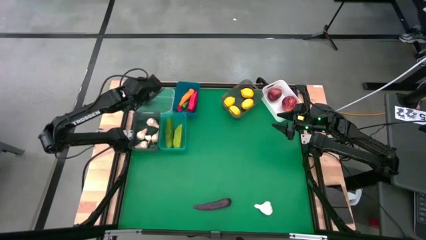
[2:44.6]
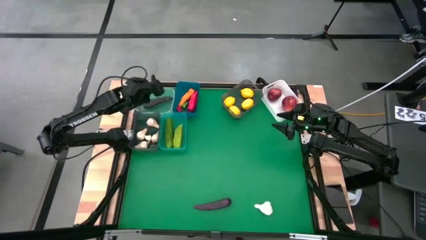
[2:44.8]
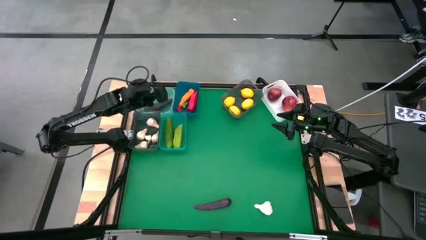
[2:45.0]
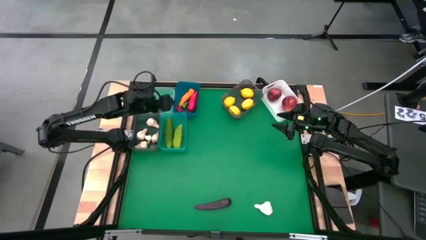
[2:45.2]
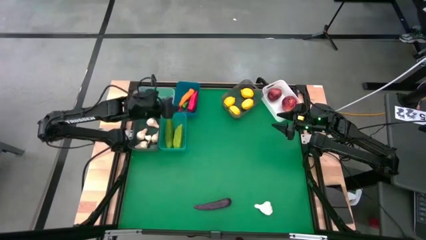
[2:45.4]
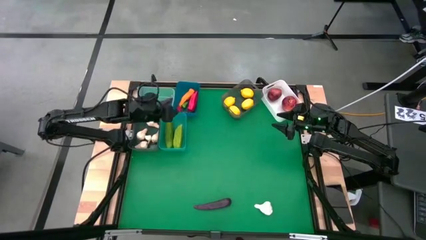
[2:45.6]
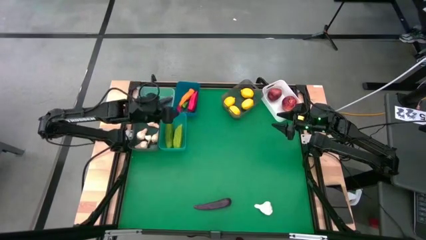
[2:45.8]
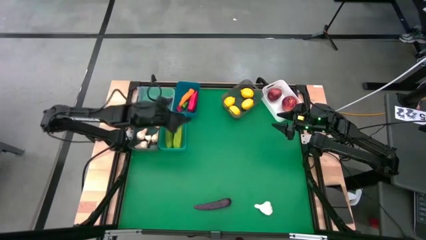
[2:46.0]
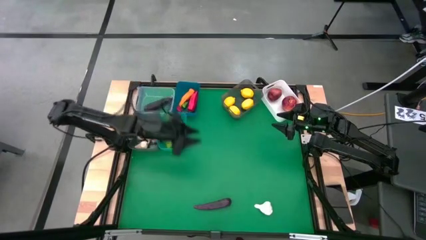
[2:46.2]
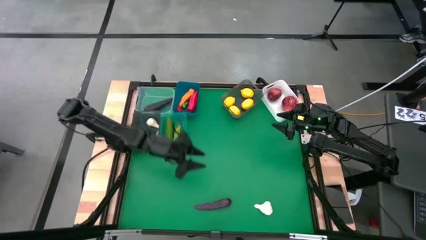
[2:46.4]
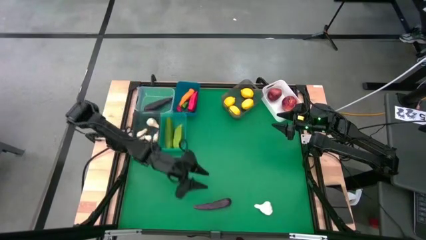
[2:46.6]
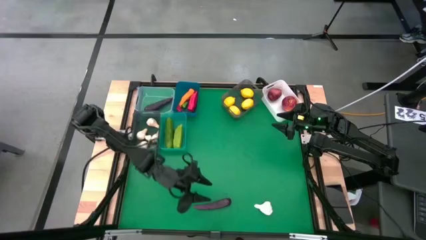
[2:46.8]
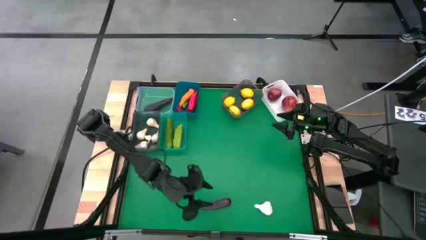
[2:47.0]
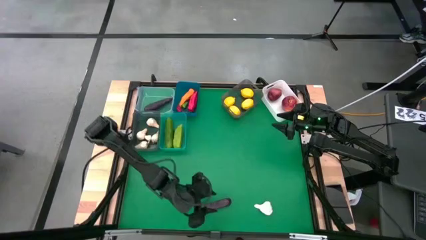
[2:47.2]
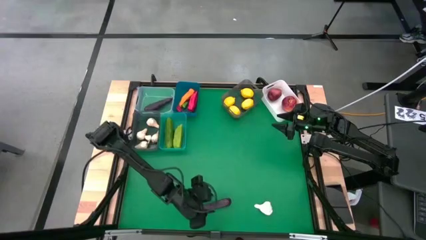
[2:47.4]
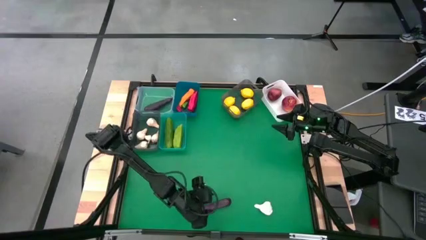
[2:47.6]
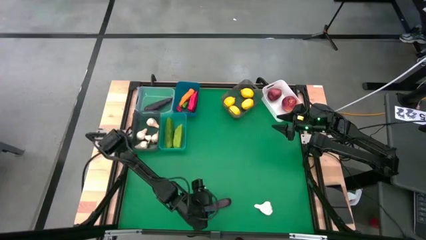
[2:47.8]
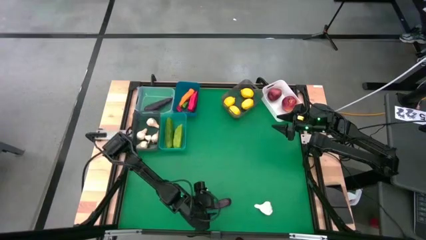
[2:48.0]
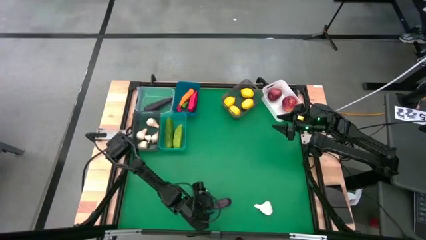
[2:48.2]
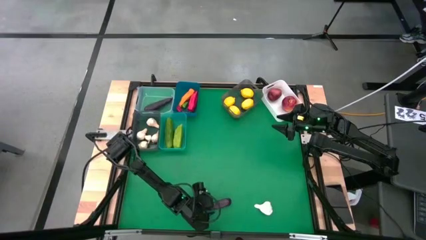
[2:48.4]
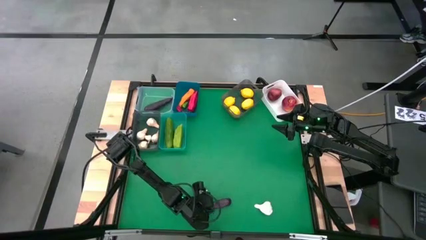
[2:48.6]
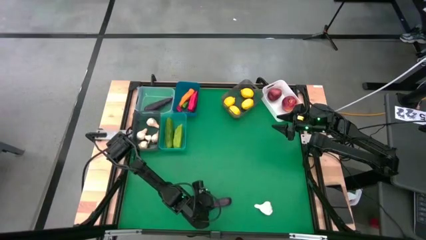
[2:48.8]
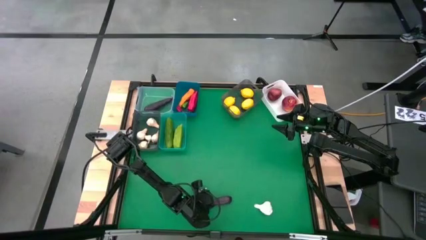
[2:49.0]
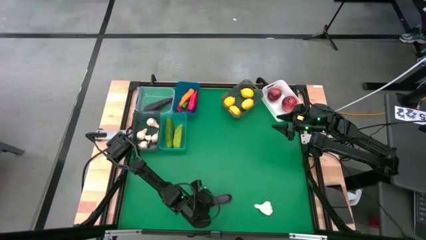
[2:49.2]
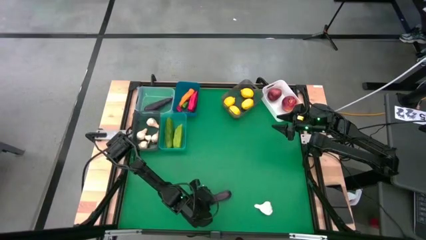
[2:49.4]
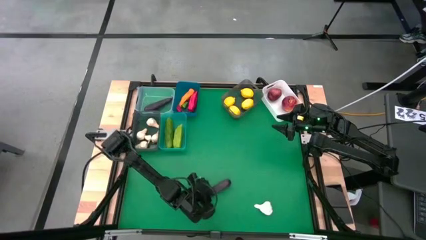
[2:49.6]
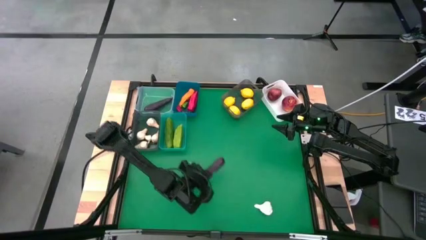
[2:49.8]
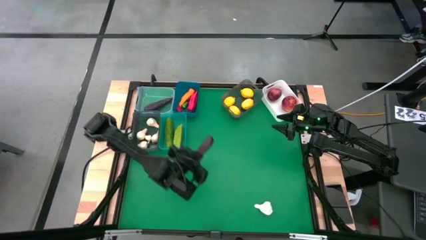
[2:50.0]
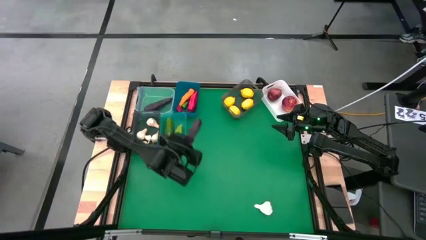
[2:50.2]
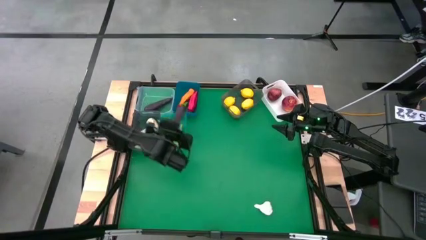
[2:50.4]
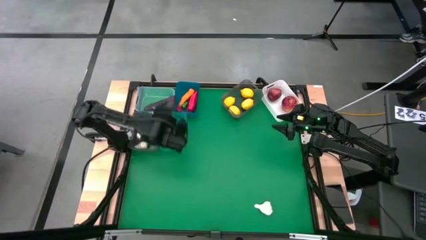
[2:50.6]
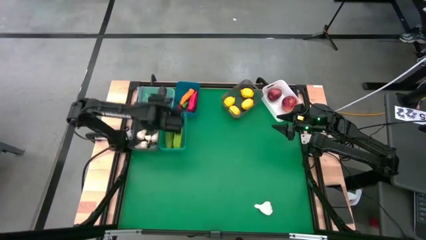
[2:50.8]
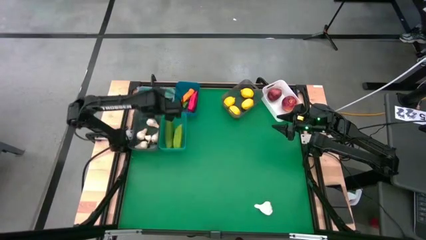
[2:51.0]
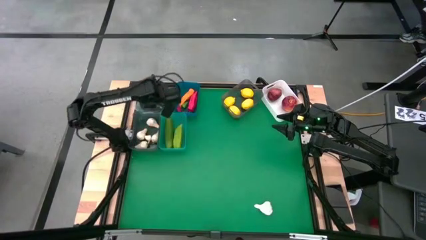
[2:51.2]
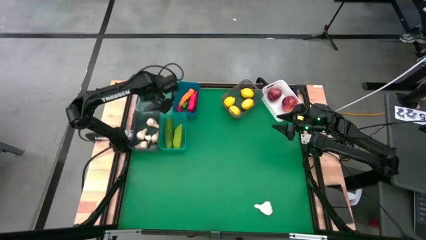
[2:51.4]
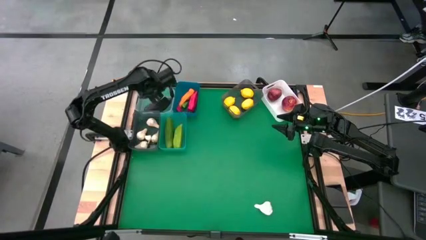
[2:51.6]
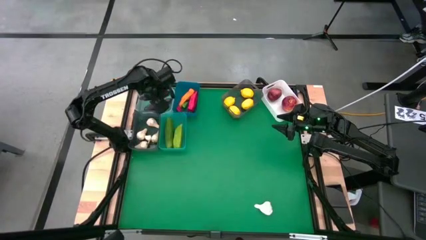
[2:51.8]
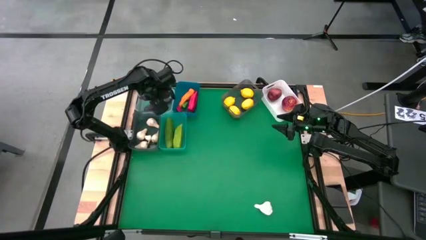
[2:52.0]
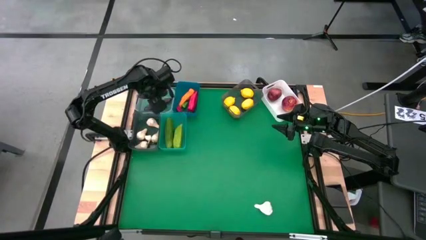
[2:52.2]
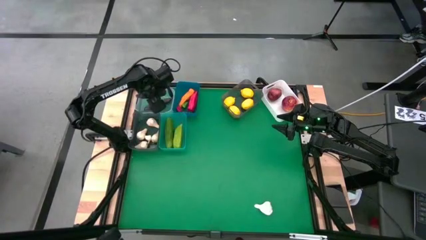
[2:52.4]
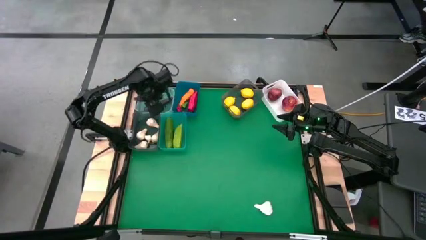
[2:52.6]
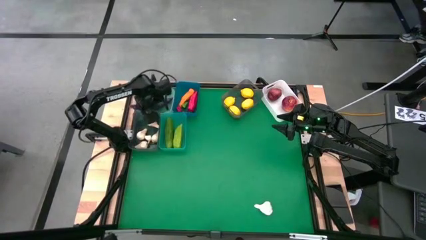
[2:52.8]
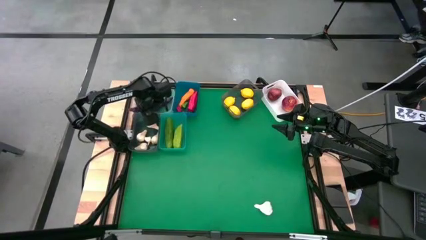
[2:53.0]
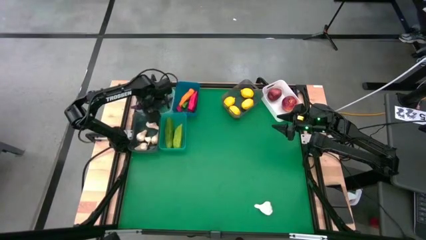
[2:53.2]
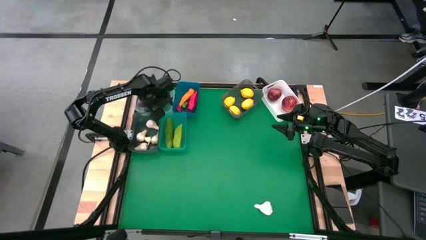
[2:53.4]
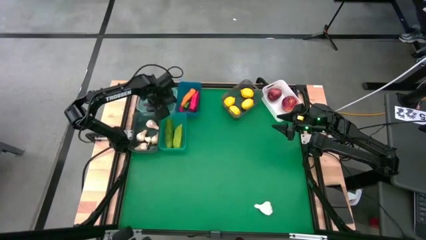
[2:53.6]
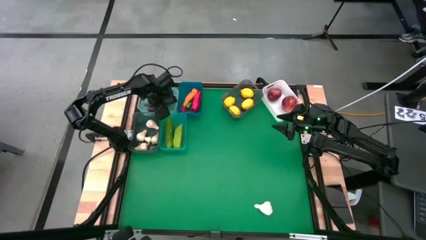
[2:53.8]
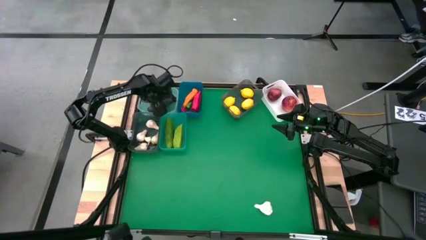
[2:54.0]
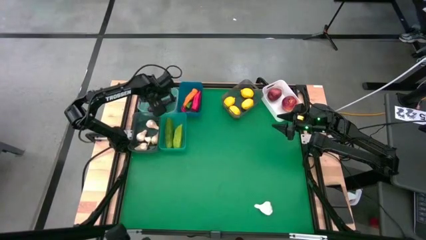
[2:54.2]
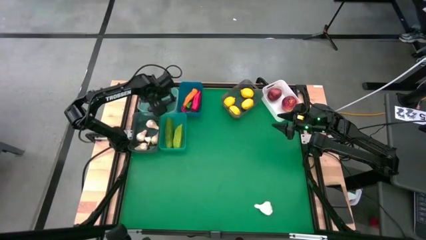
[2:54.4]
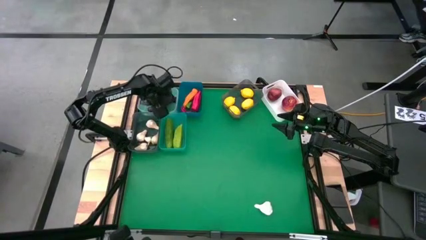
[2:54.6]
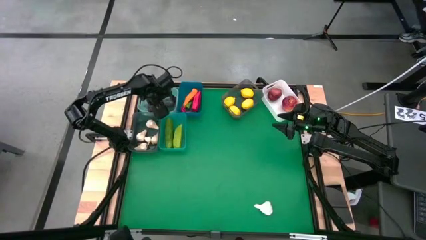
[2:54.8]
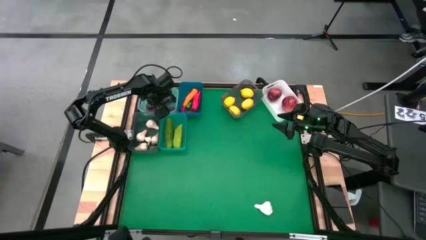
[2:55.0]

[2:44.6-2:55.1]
Task: Sort produce into baskets
Put the purple eggplant into the transparent bin

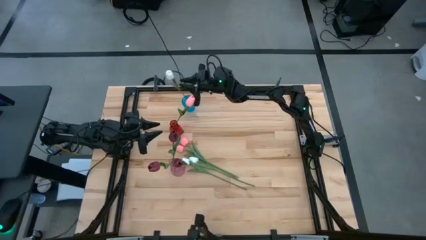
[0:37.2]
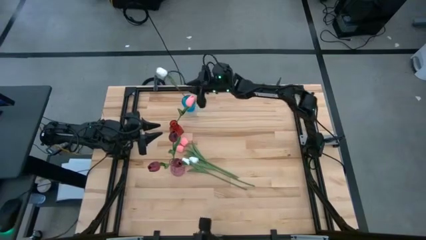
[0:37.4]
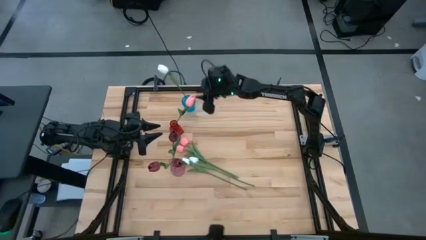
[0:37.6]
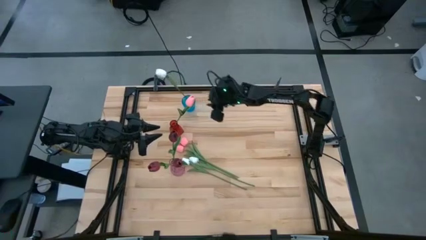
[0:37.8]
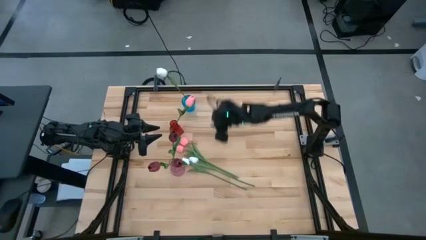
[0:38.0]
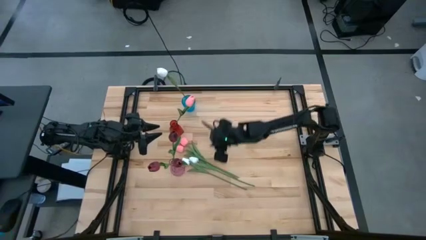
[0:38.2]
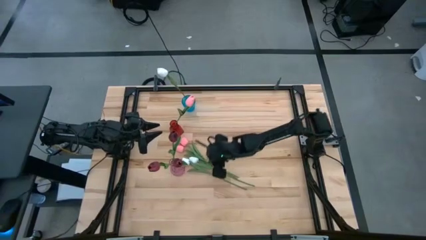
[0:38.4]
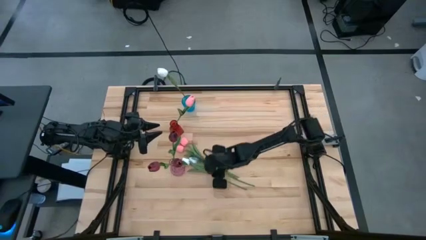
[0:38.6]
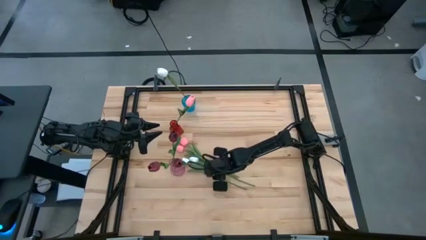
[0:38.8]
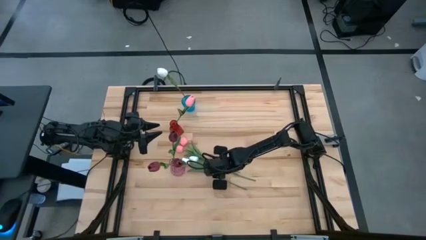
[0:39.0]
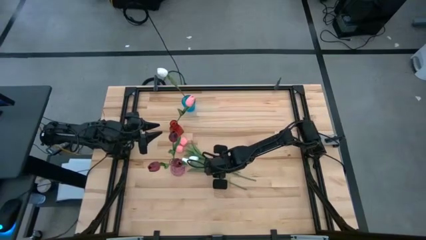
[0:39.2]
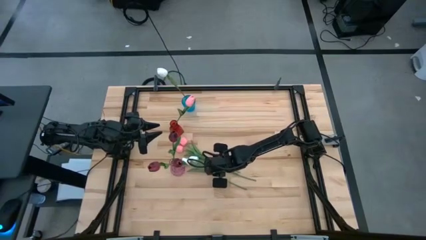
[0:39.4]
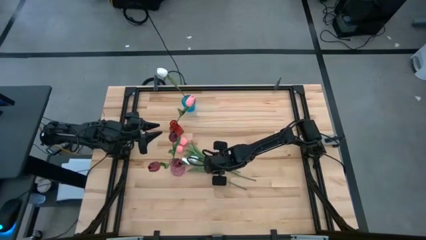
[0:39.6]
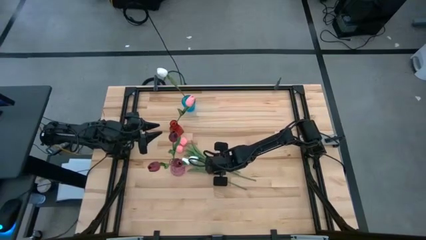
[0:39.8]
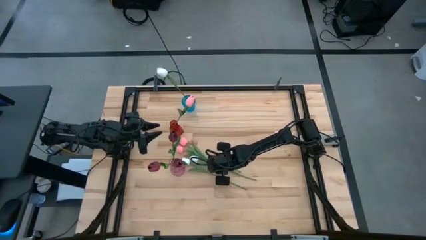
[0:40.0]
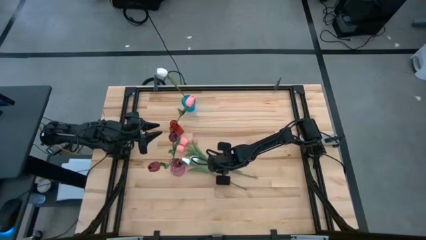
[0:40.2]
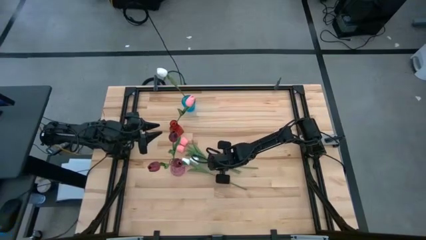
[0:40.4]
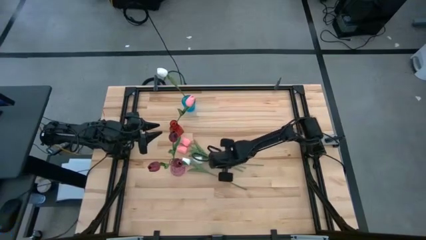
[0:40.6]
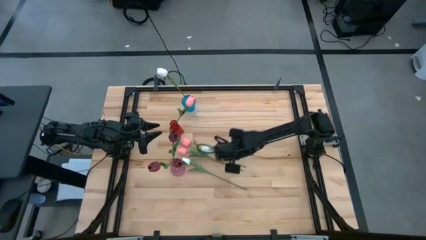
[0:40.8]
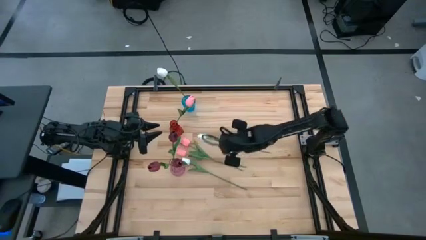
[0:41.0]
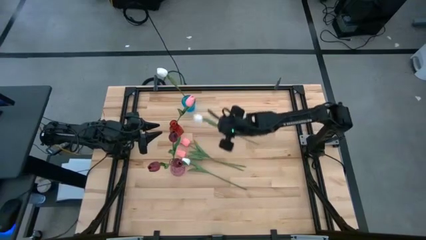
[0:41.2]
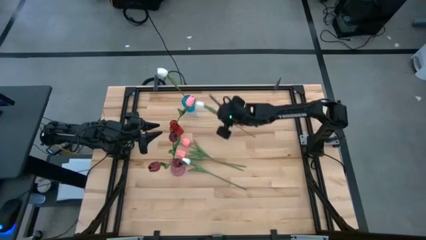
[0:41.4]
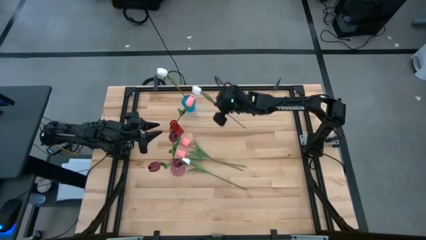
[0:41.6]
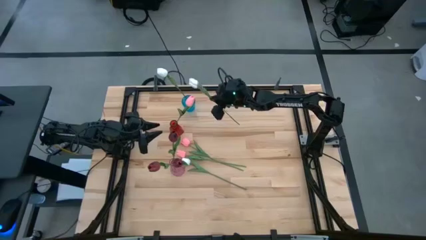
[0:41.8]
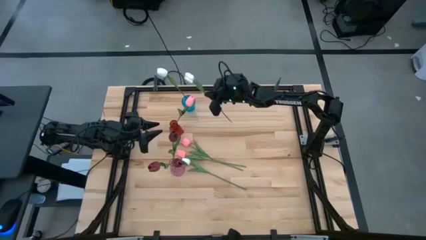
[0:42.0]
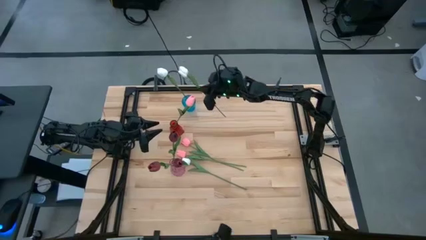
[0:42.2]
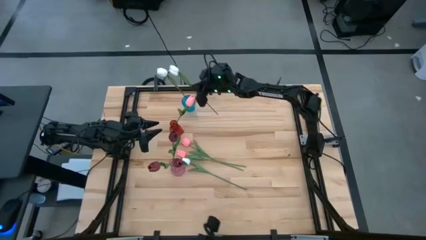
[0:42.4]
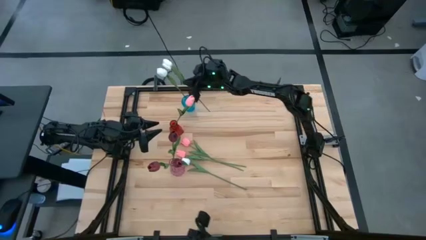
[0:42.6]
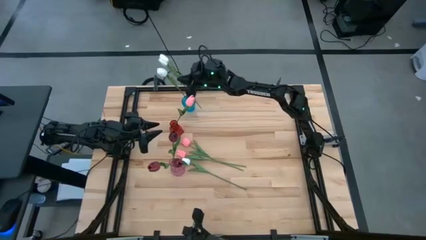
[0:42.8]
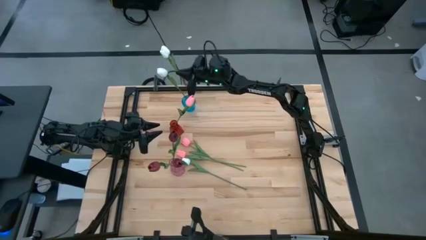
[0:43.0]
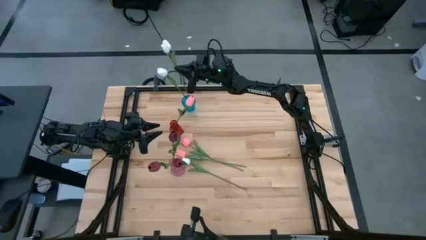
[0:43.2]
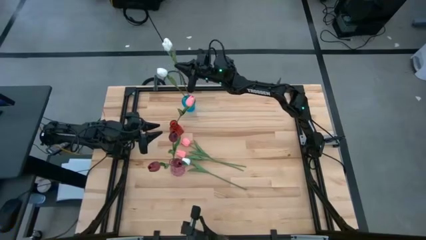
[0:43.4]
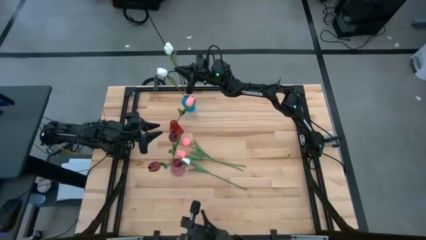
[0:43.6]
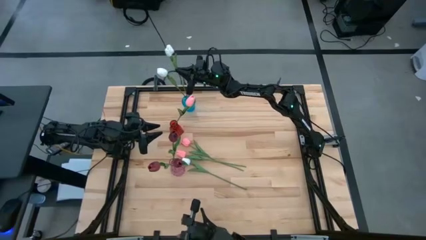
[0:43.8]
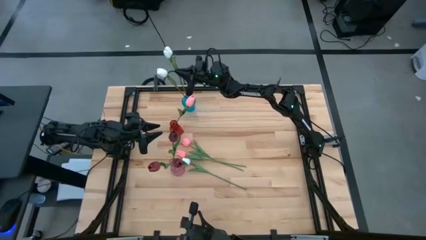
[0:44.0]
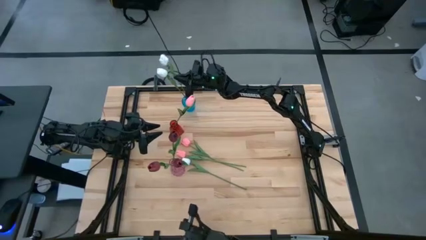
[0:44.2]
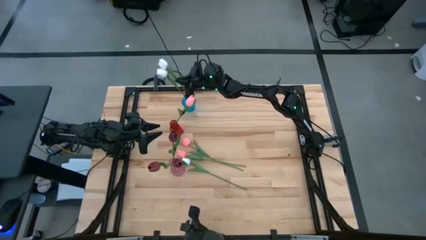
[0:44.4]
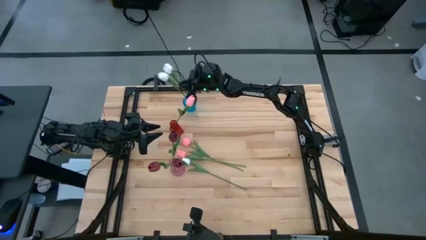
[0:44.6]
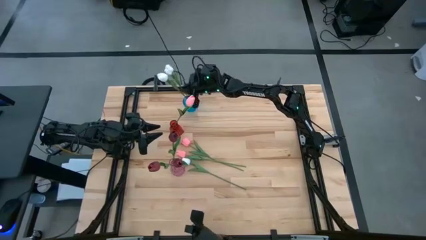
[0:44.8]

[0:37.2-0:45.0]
Task: Sort flowers into vase by color
Put the white tulip into the blue vase
